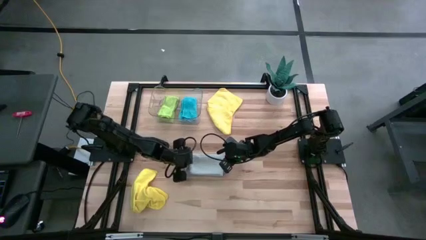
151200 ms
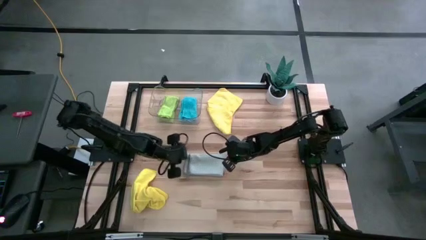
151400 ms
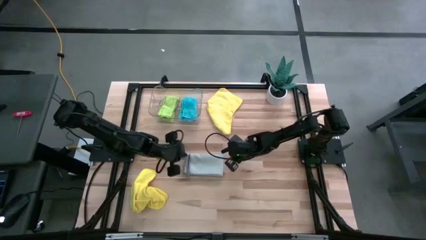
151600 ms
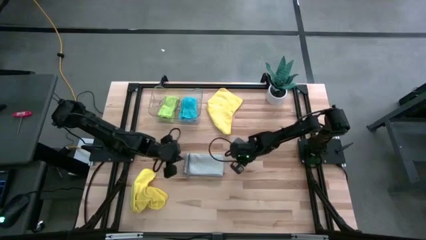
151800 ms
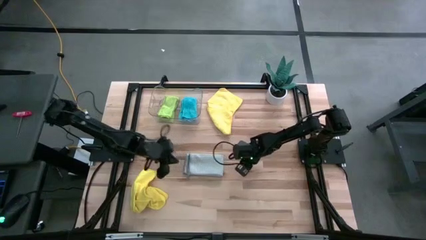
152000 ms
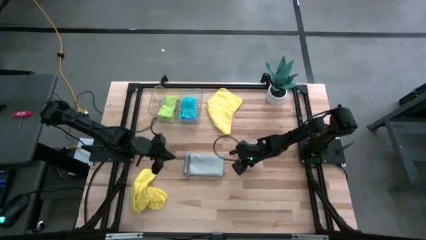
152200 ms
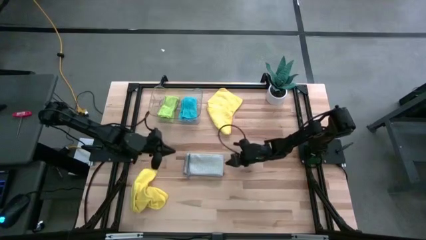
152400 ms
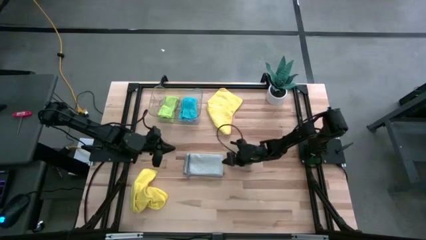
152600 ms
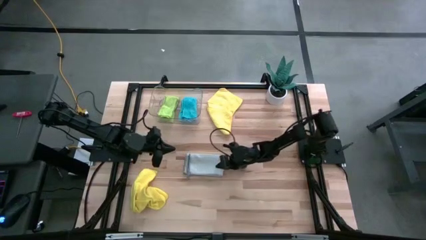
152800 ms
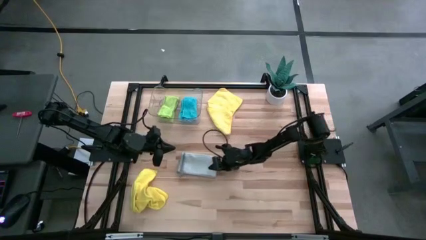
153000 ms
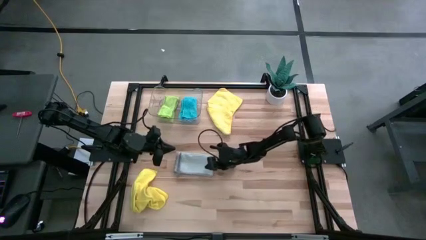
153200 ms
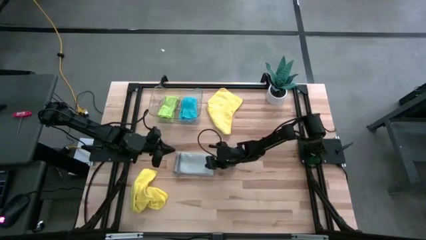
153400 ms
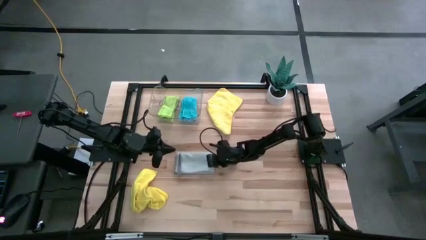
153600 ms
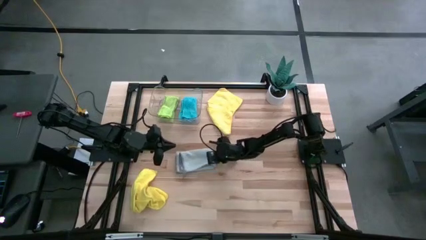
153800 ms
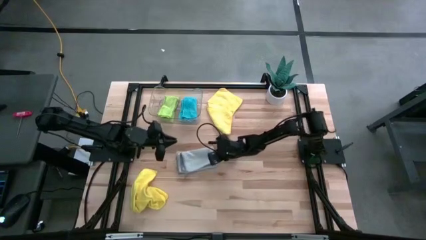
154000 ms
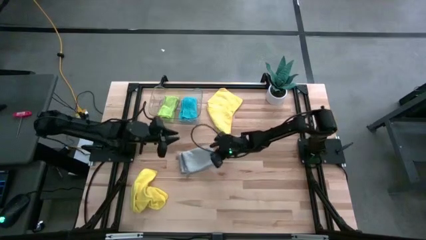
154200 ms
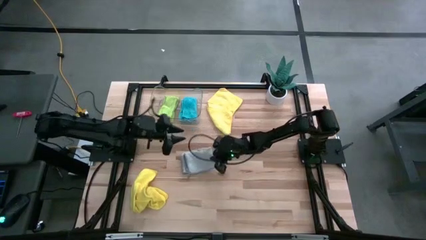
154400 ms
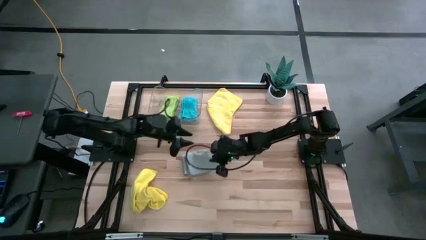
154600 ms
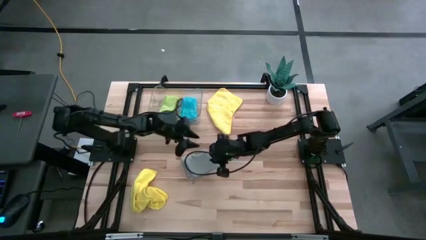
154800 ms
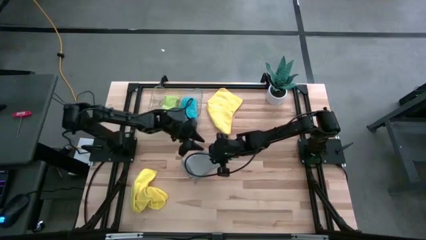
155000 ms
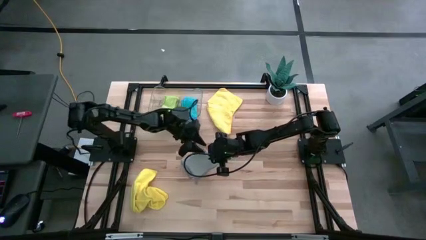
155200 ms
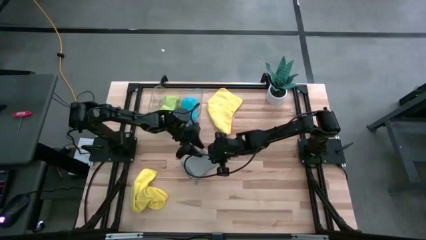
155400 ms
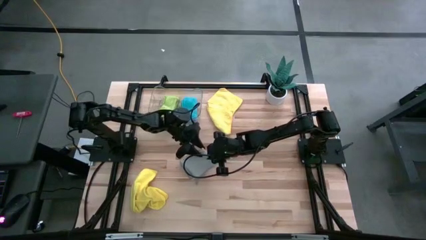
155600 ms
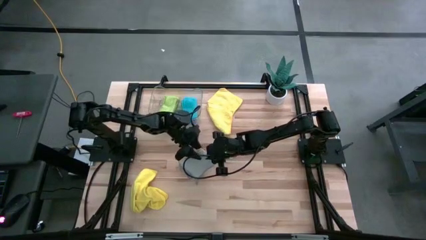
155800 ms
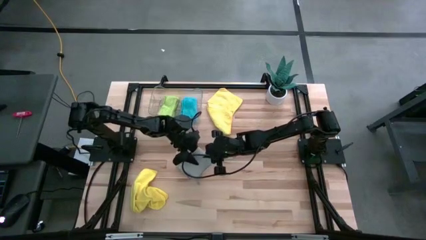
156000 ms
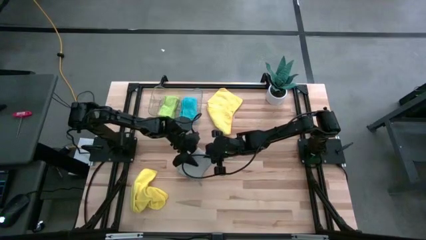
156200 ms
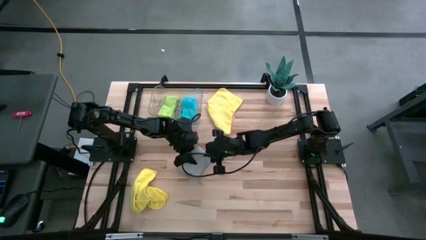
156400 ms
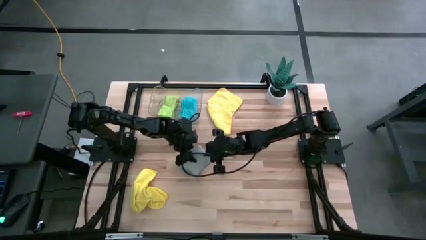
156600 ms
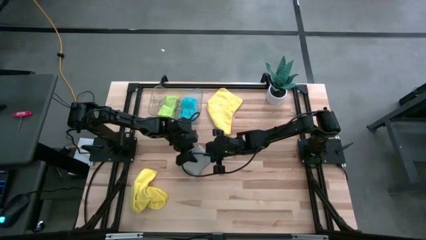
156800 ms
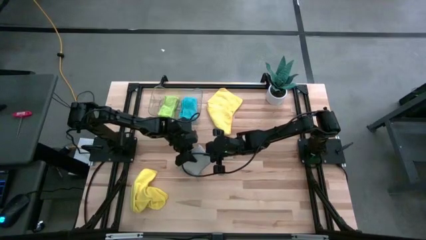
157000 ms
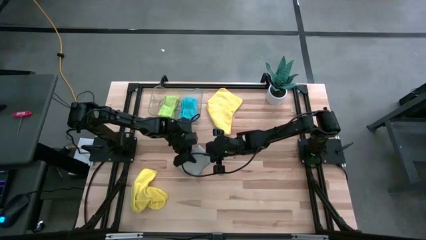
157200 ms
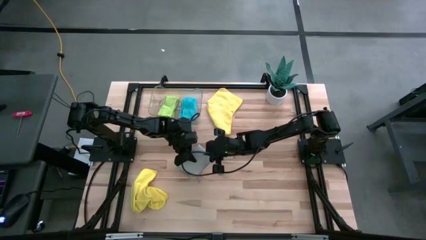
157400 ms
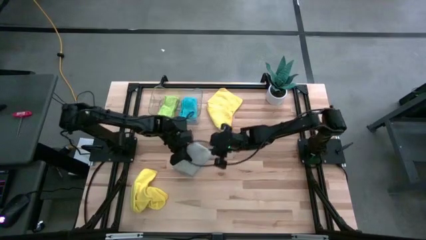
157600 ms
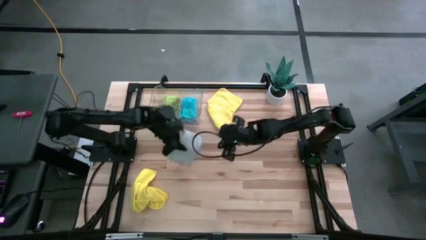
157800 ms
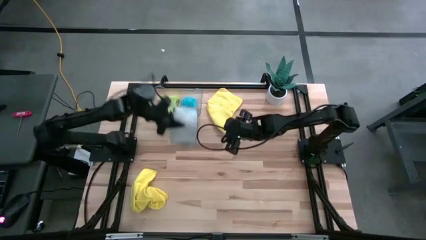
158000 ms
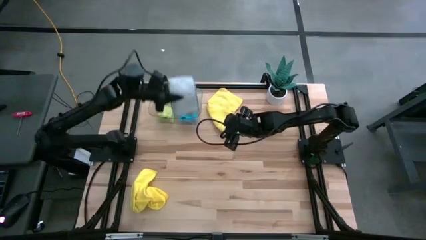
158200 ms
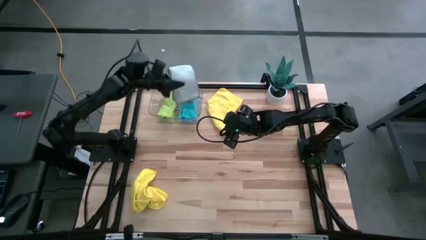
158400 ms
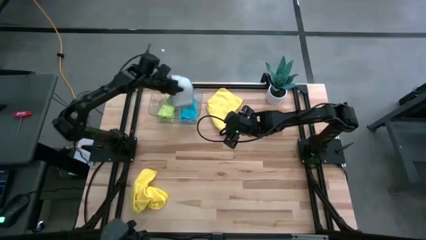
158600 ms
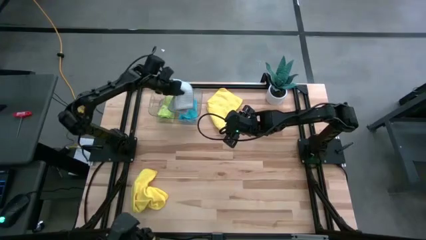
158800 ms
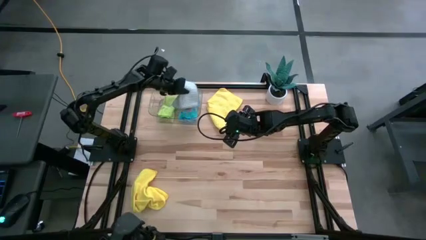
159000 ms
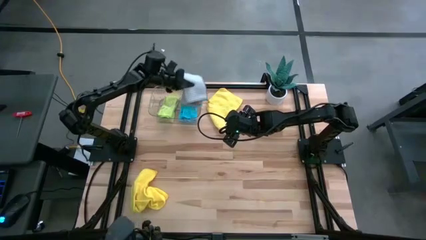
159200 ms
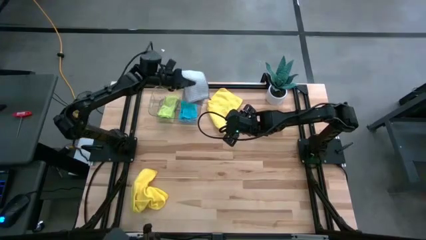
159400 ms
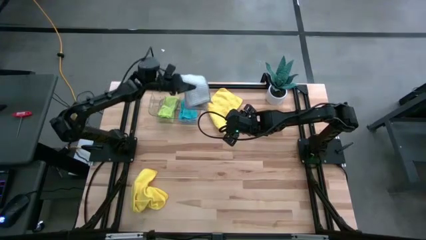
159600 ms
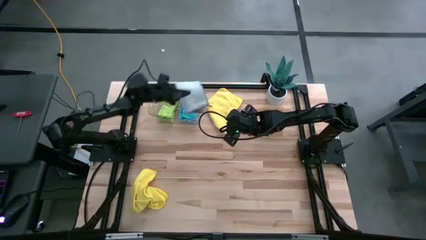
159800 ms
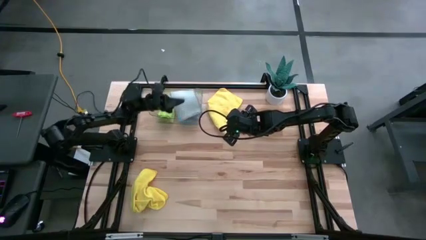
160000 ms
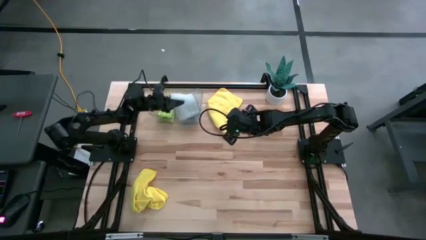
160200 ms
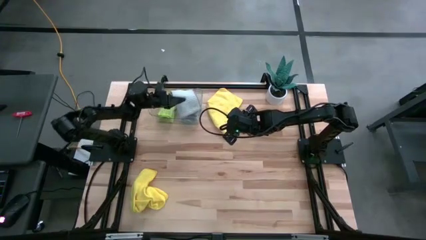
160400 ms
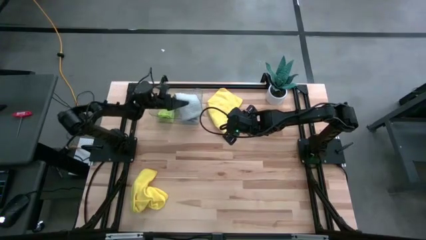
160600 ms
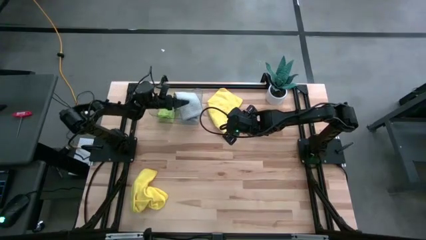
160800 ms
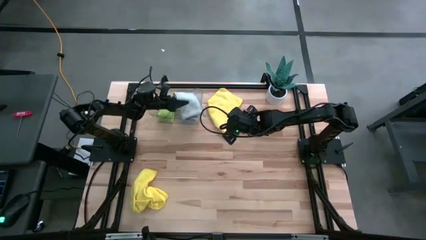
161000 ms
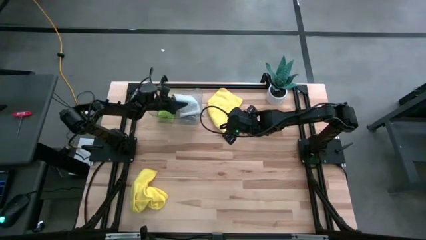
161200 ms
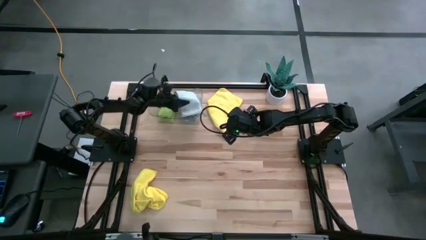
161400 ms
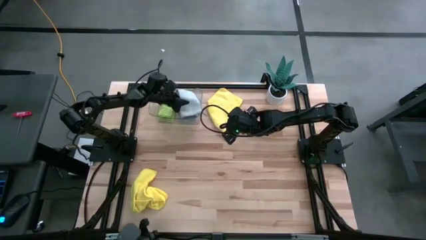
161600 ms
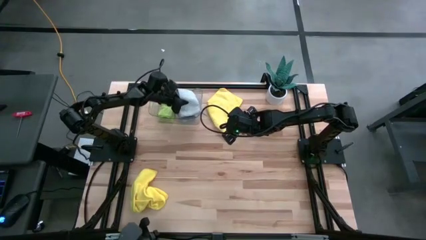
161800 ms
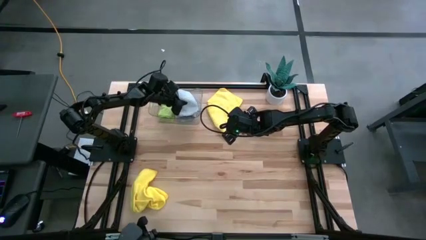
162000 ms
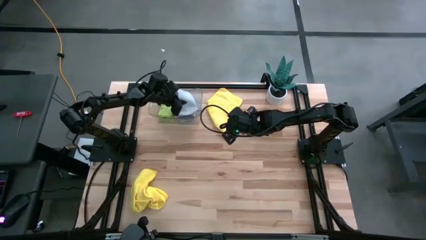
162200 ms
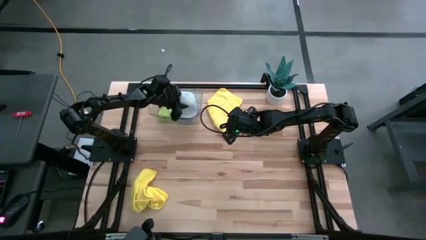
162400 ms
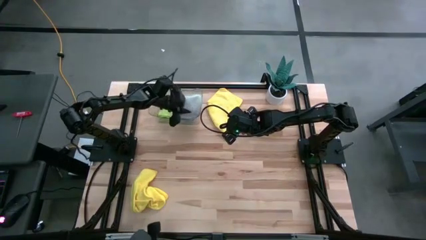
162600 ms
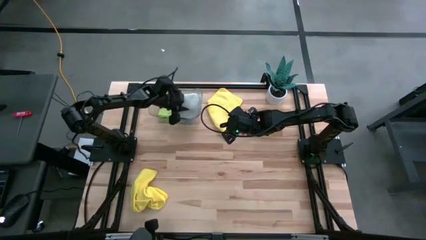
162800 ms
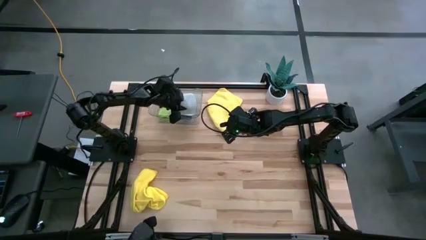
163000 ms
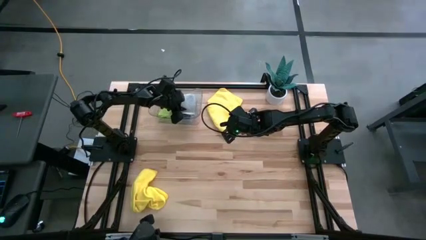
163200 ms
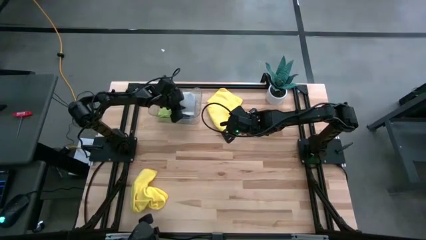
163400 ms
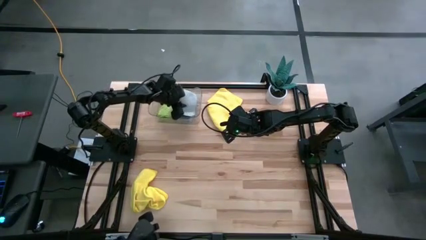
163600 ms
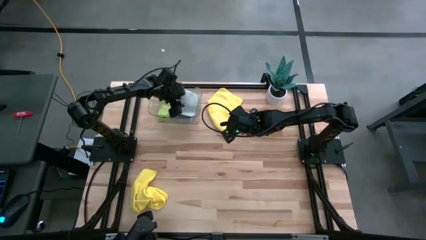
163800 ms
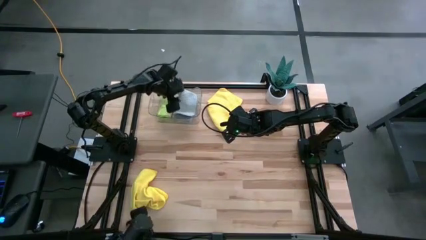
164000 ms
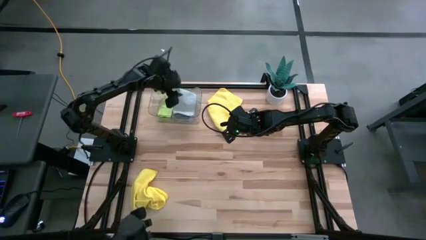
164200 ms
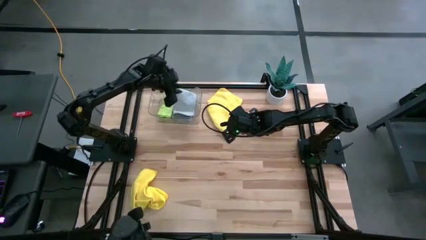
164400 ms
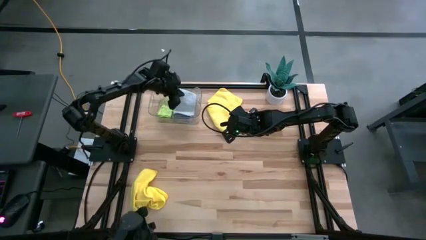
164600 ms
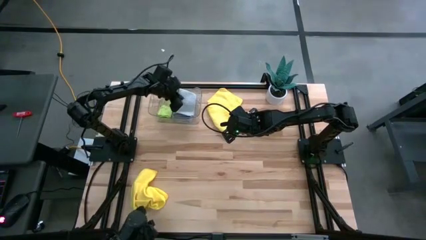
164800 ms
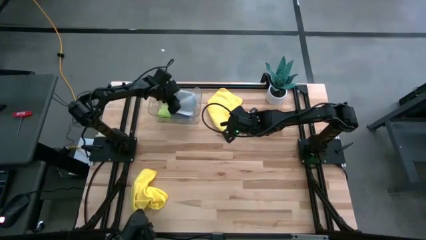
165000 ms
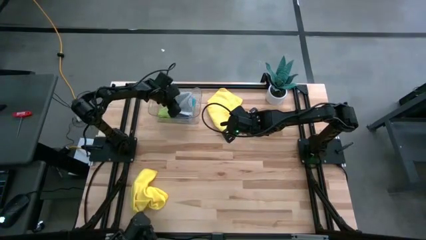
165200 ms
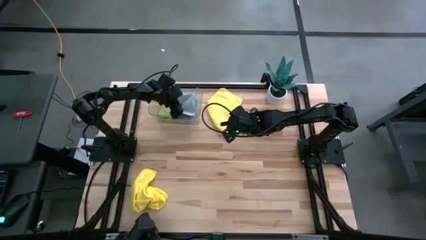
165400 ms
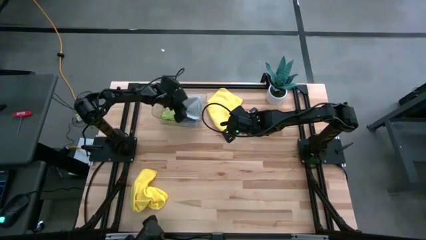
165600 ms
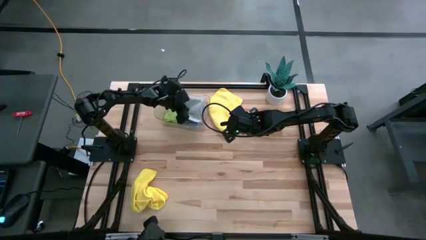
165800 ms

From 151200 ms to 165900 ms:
Task: Fold microfiber towels
Put the gray towel into the transparent bin
